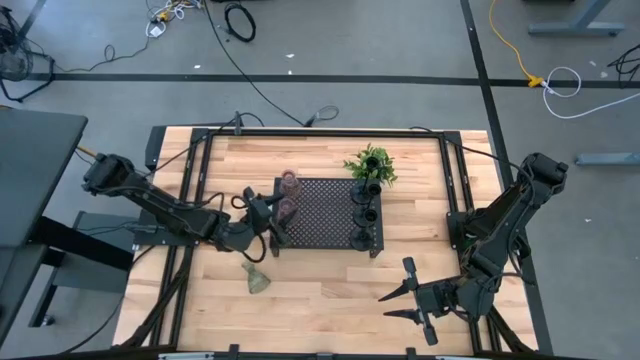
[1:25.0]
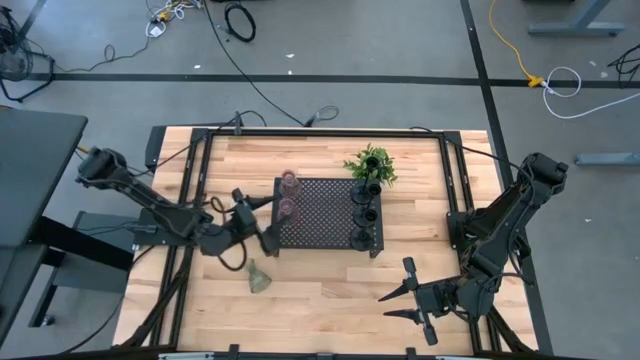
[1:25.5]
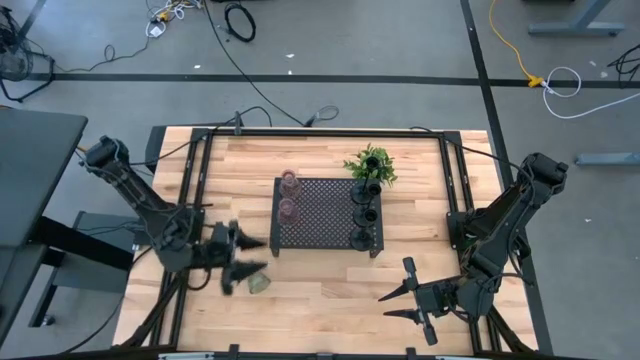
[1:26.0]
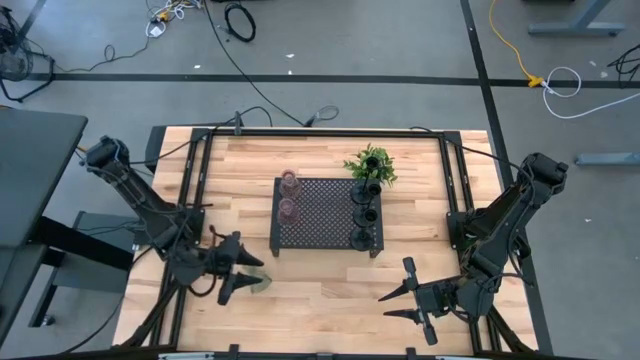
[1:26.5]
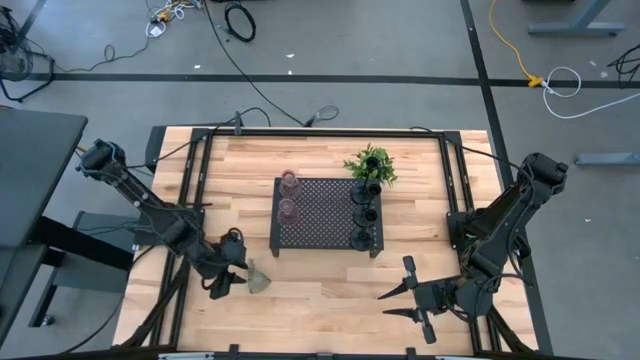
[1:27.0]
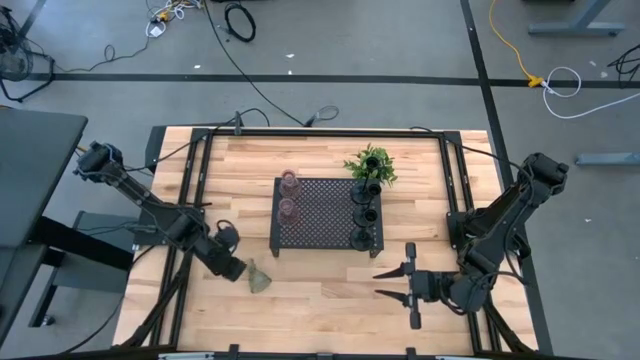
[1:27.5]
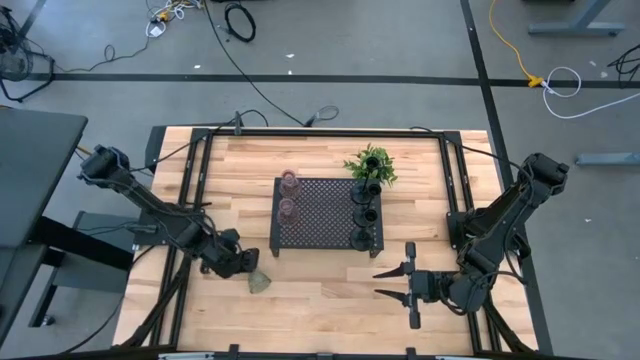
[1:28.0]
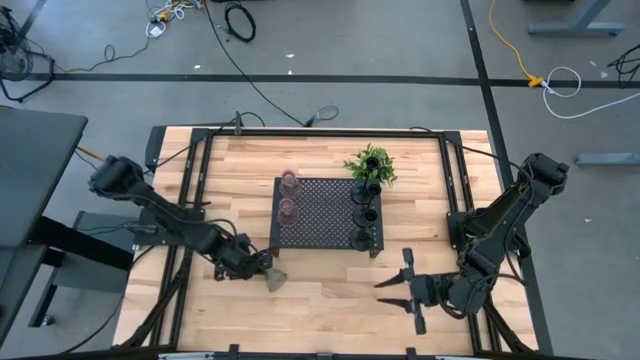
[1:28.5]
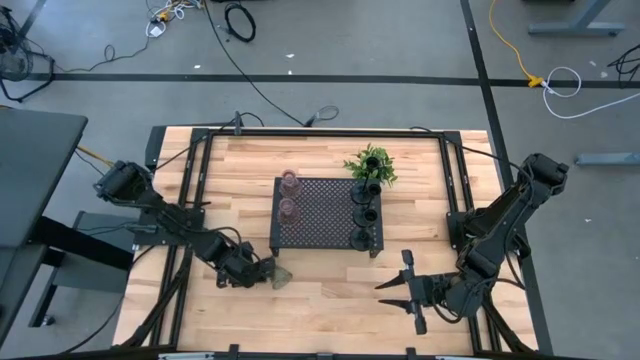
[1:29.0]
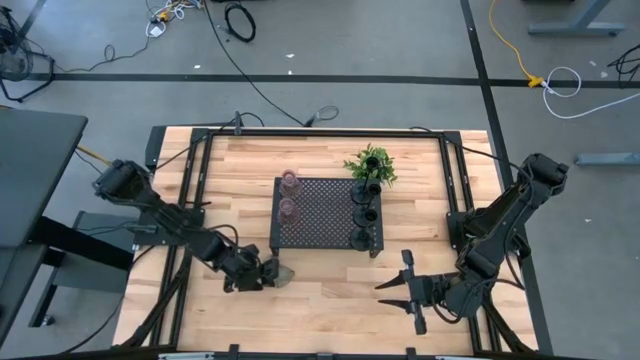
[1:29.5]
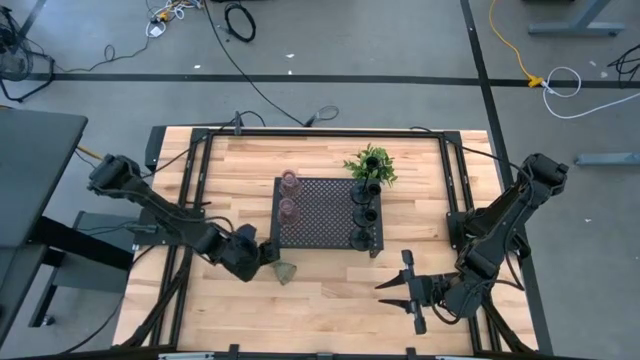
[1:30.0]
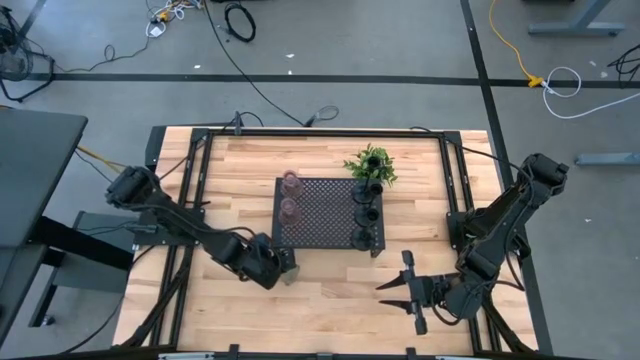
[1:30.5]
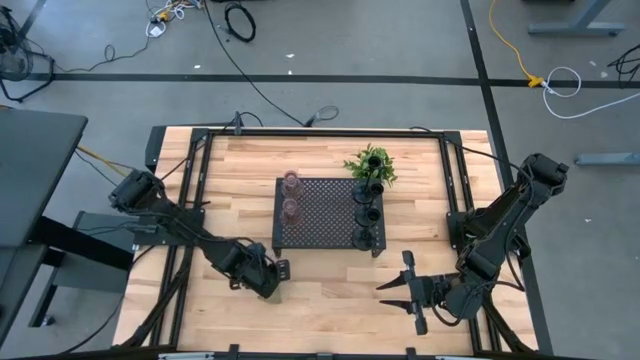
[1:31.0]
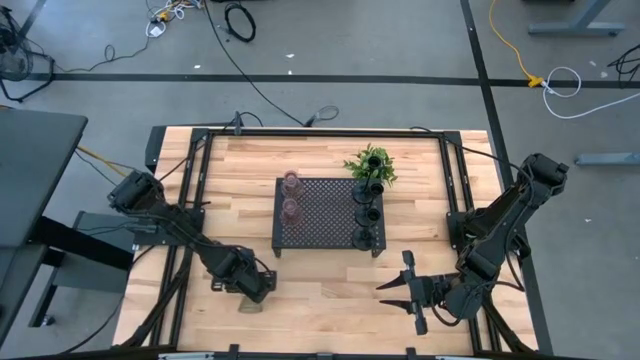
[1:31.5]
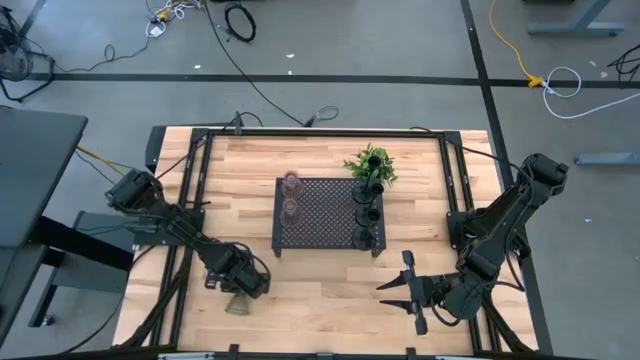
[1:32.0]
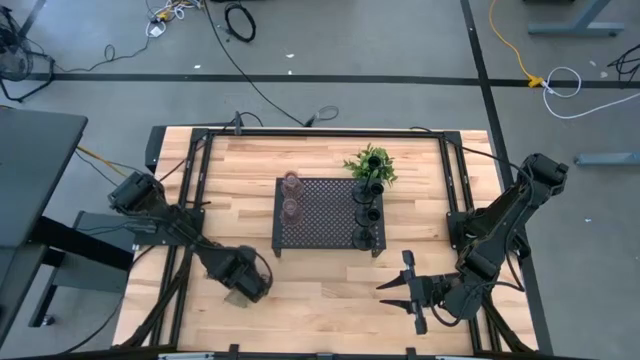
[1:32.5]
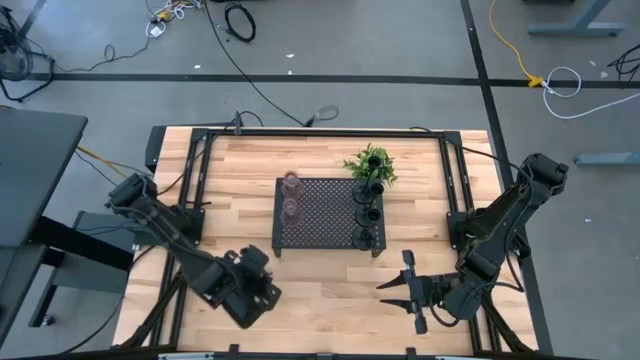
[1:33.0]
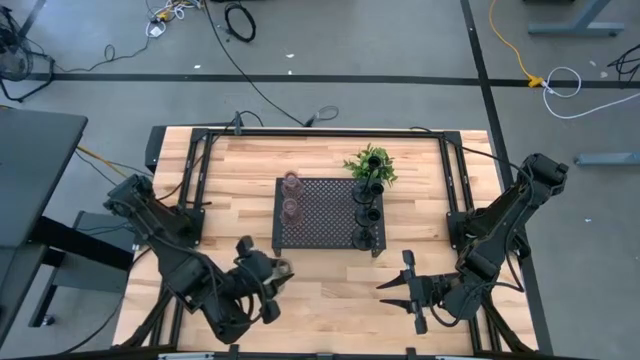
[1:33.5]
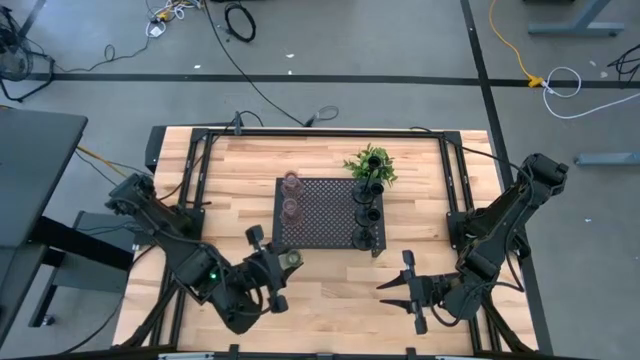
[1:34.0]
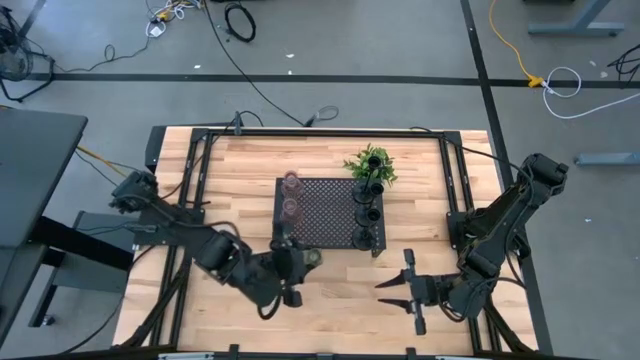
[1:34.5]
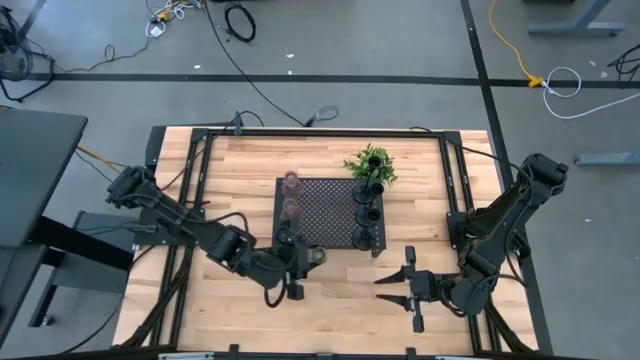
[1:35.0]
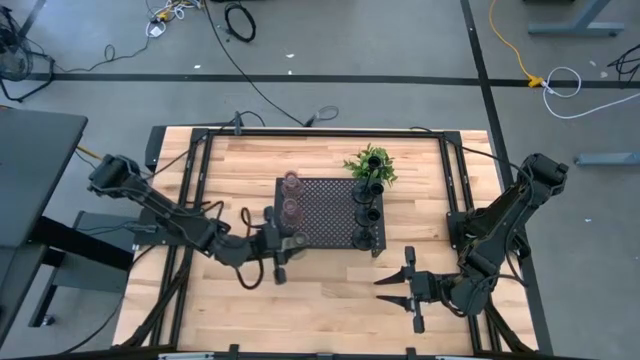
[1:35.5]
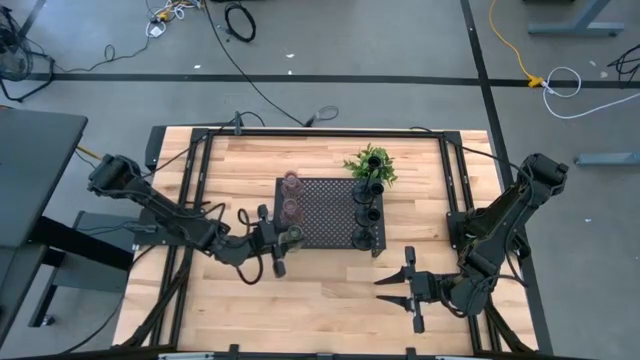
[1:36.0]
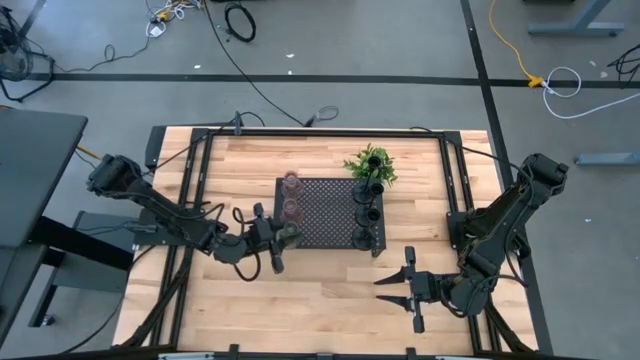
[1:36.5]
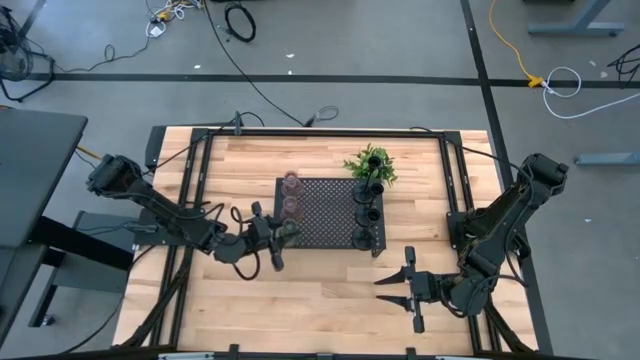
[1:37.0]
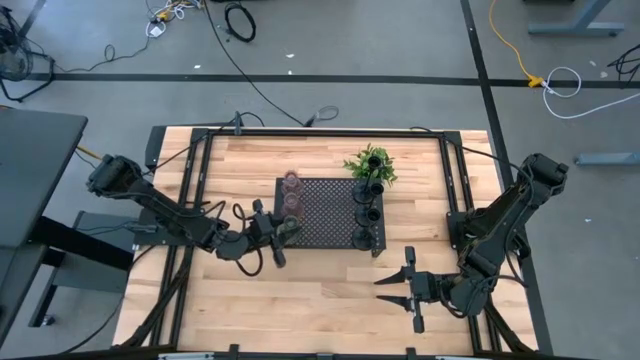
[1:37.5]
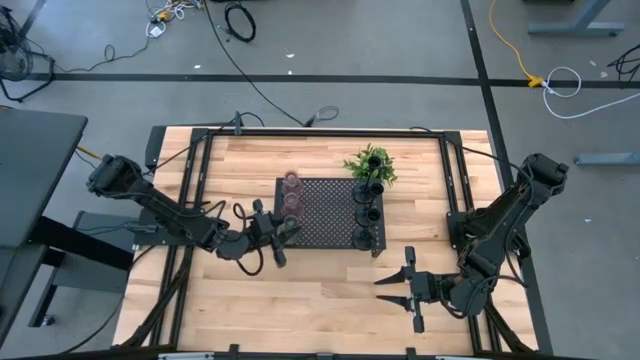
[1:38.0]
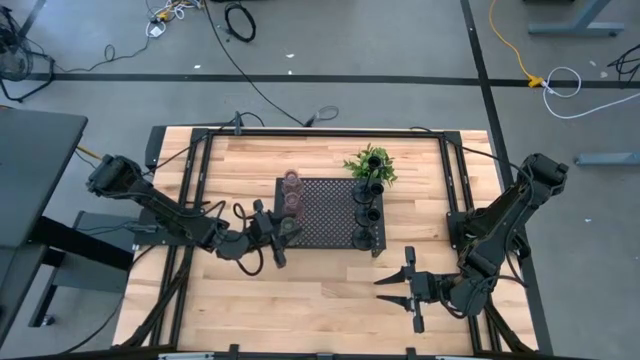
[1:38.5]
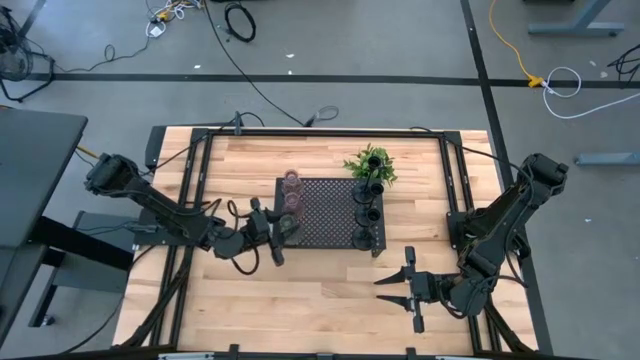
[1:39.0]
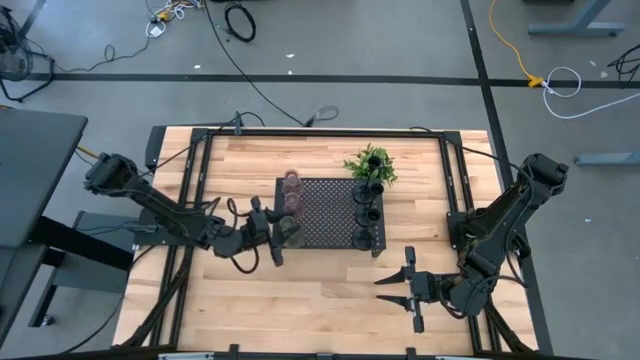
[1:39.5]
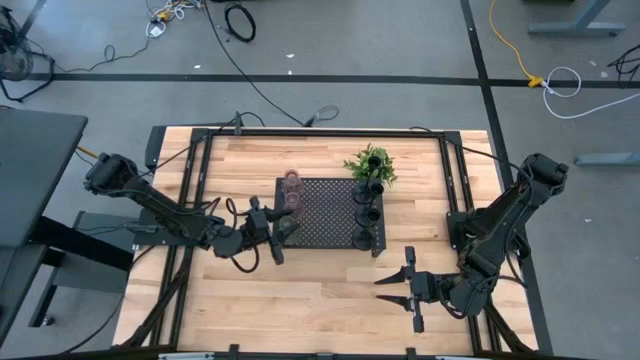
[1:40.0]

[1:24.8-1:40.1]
Task: Pick & Place candle stick holders
Put the green glass candle stick holder on the shelf

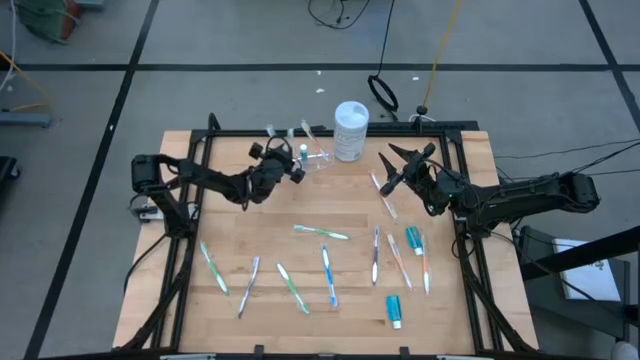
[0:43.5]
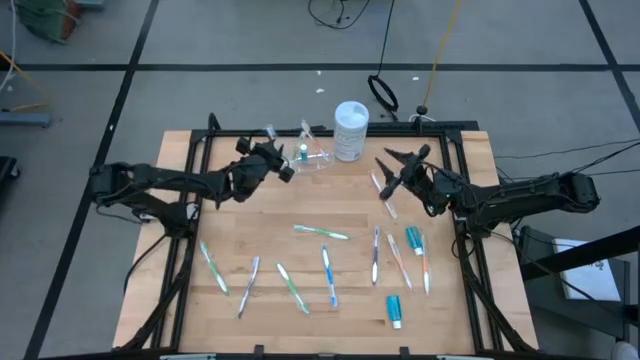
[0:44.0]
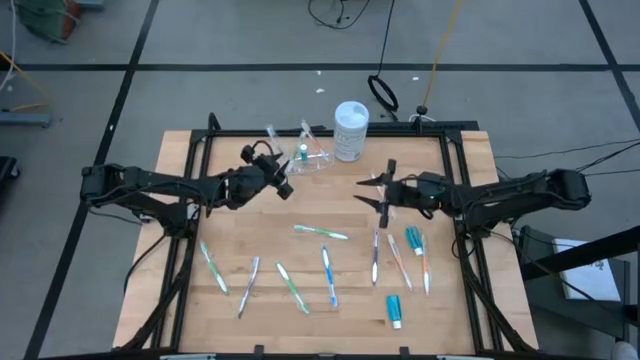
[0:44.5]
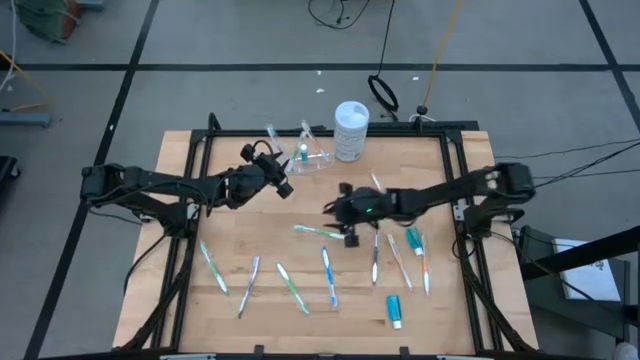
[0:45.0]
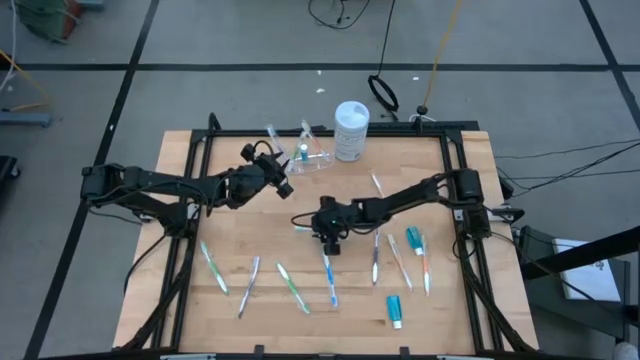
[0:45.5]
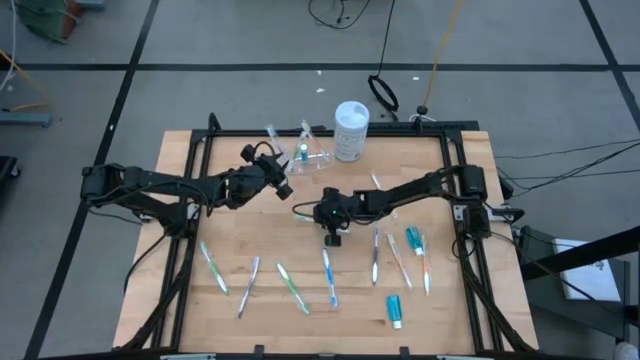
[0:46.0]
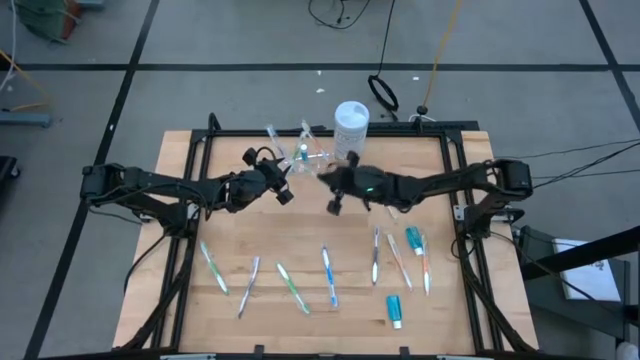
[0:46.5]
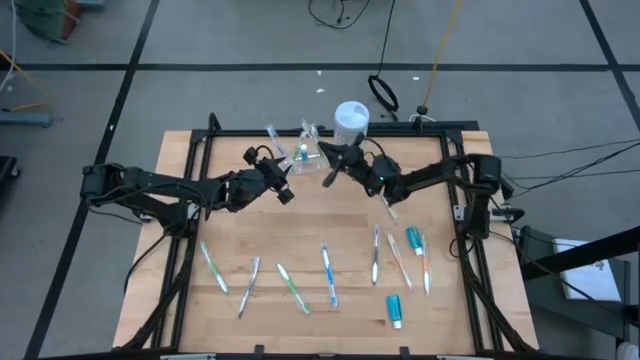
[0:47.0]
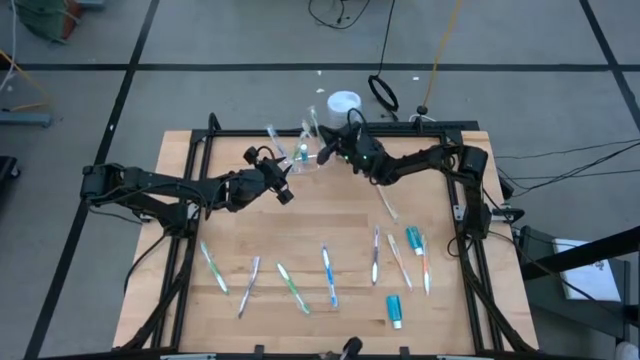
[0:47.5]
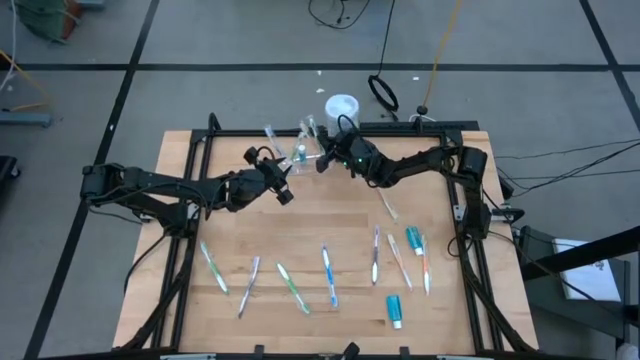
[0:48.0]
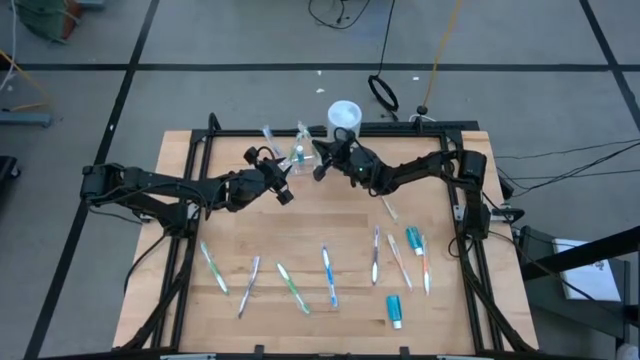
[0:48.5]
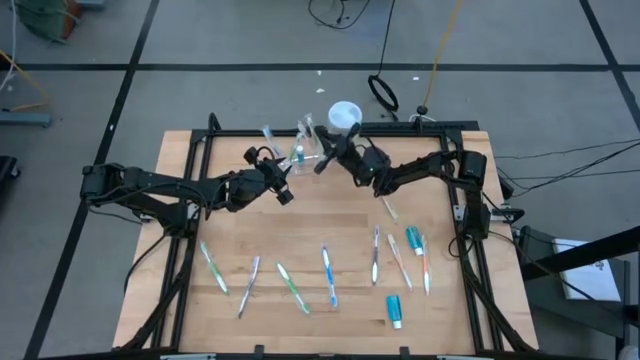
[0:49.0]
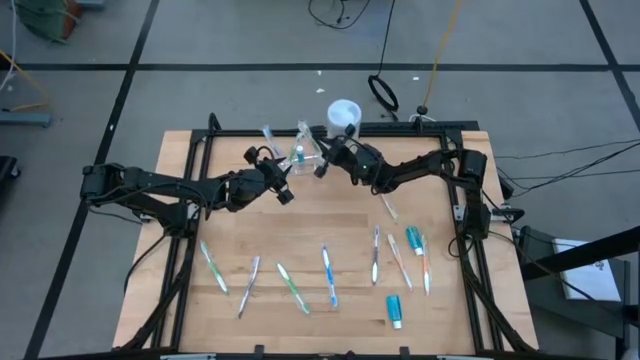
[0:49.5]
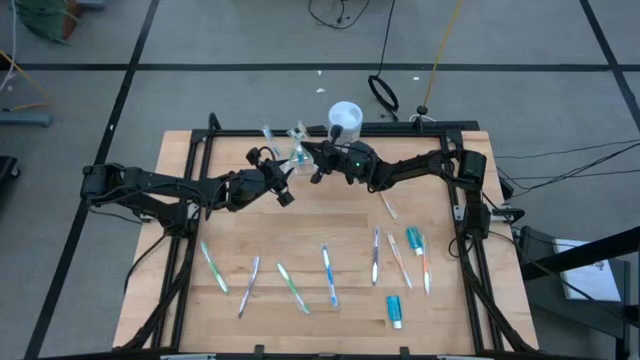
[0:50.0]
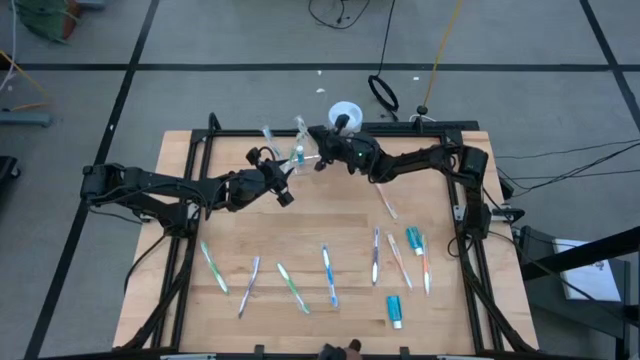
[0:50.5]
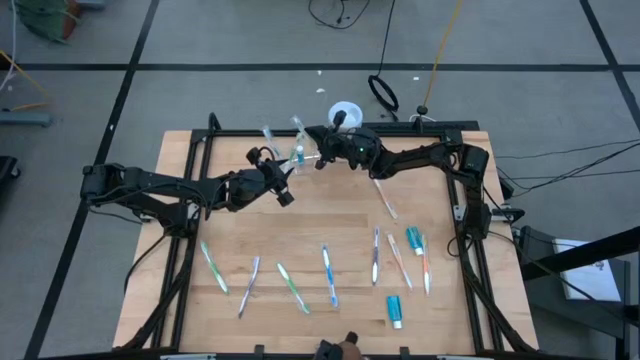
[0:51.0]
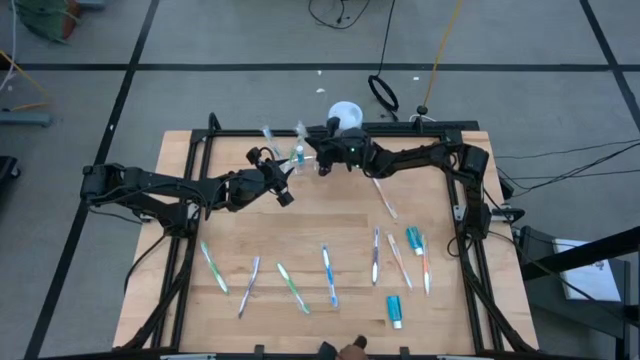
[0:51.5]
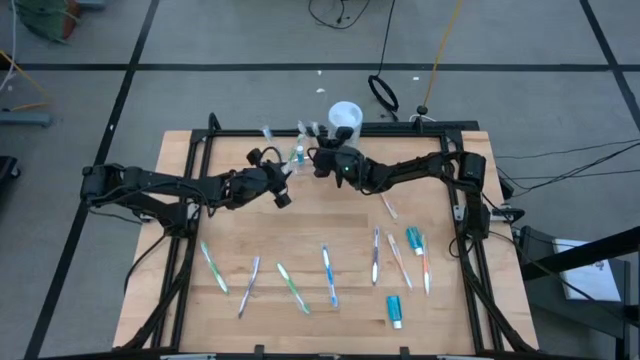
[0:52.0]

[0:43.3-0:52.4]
Task: Pick & Place toothbrushing station
Put the green toothbrush into the transparent organizer
